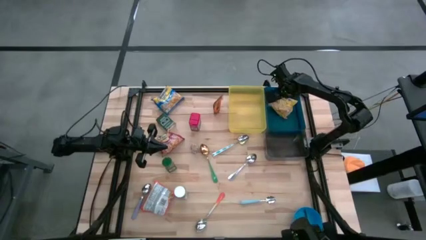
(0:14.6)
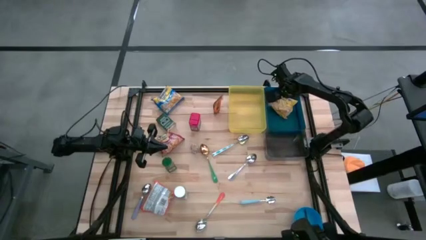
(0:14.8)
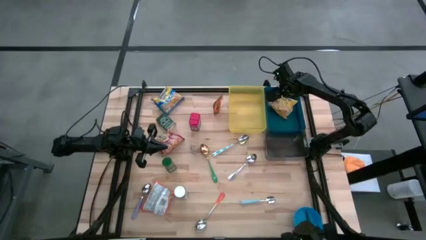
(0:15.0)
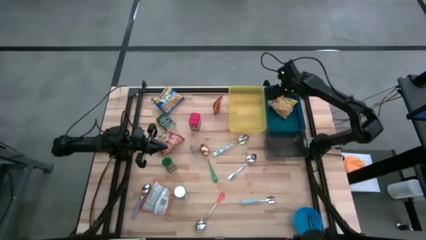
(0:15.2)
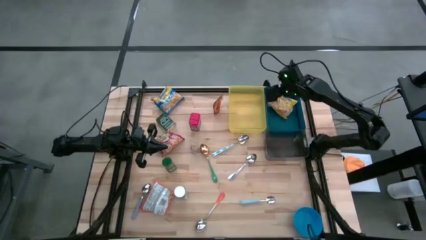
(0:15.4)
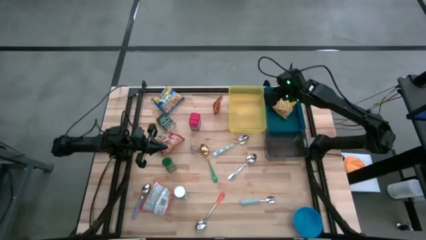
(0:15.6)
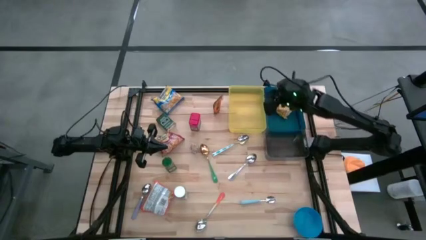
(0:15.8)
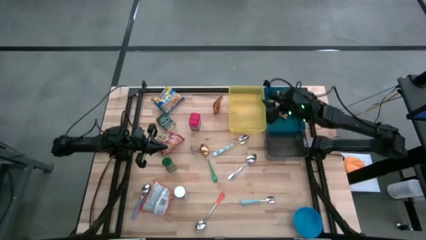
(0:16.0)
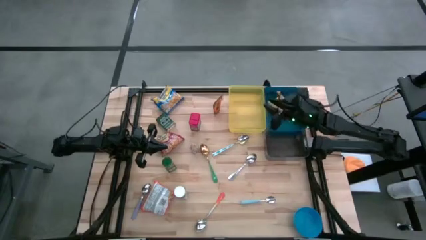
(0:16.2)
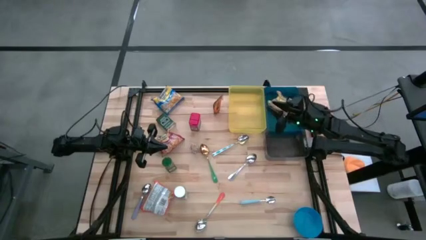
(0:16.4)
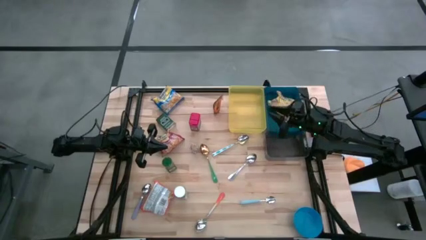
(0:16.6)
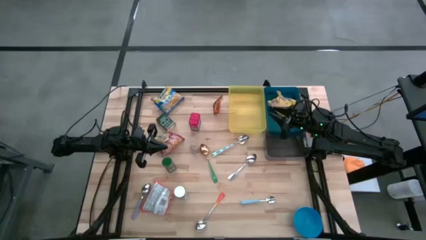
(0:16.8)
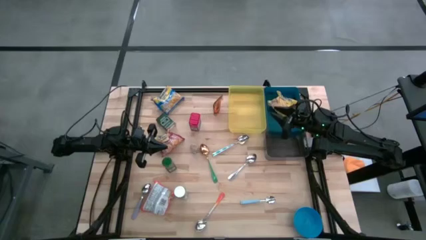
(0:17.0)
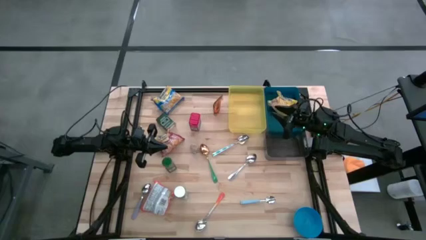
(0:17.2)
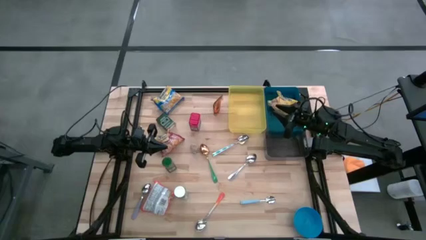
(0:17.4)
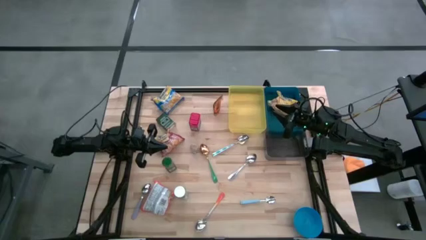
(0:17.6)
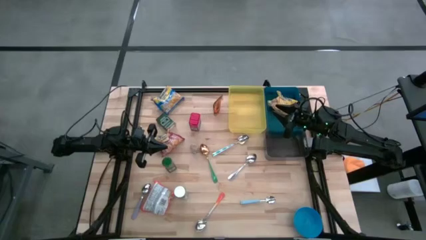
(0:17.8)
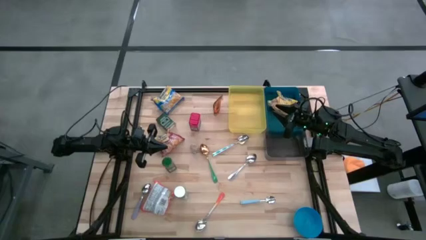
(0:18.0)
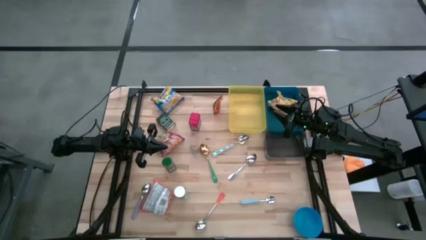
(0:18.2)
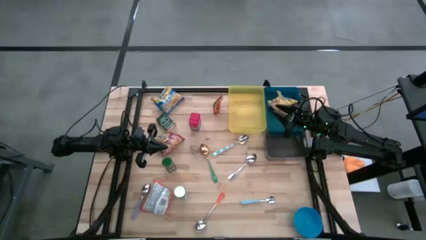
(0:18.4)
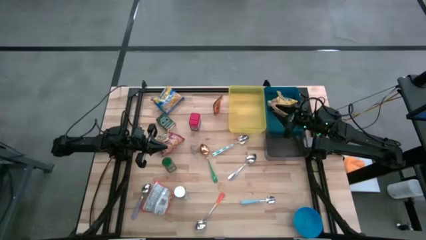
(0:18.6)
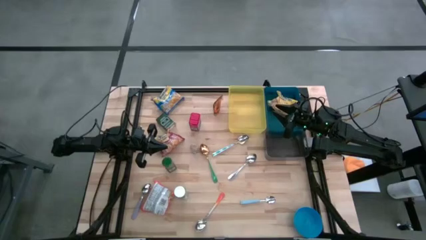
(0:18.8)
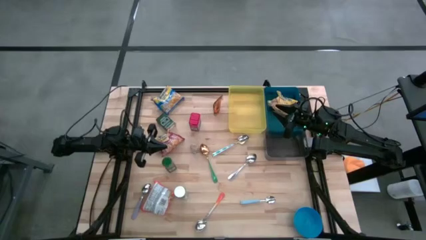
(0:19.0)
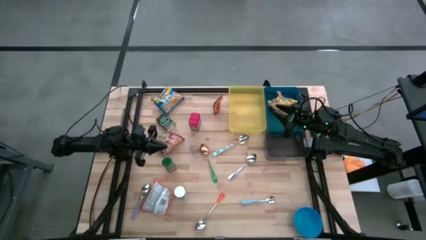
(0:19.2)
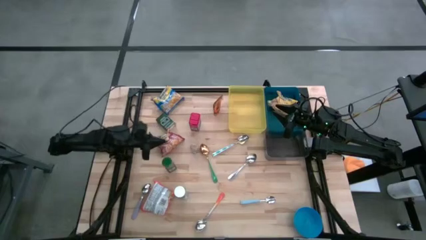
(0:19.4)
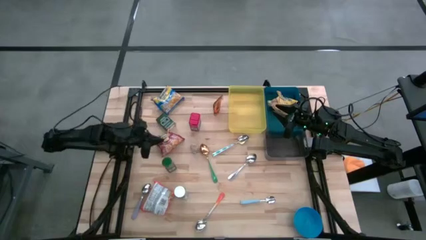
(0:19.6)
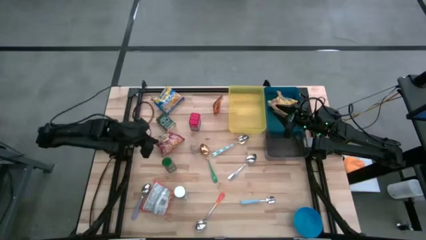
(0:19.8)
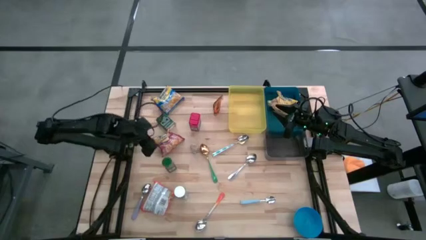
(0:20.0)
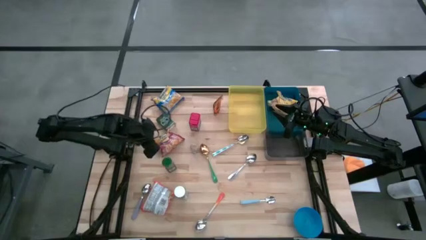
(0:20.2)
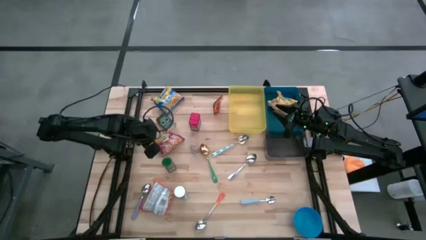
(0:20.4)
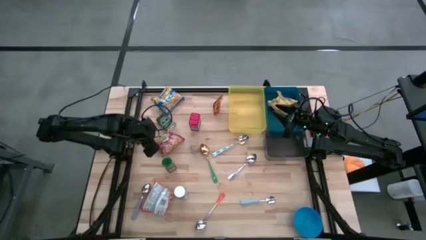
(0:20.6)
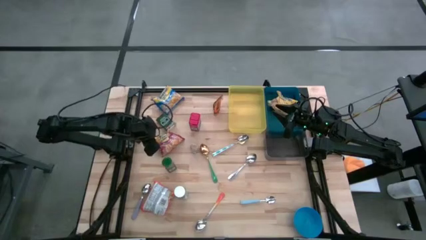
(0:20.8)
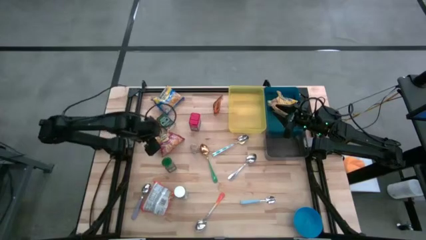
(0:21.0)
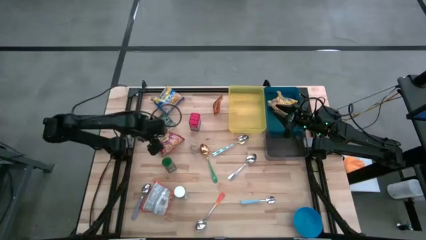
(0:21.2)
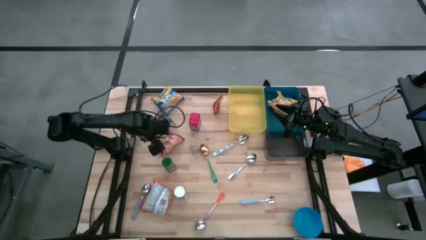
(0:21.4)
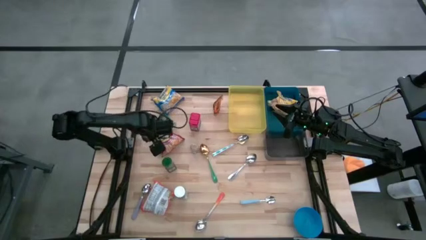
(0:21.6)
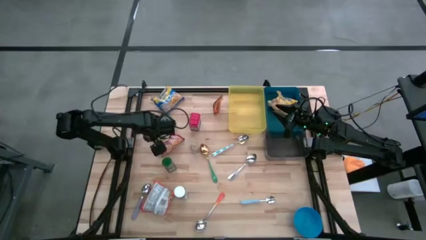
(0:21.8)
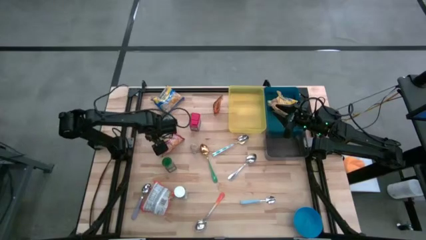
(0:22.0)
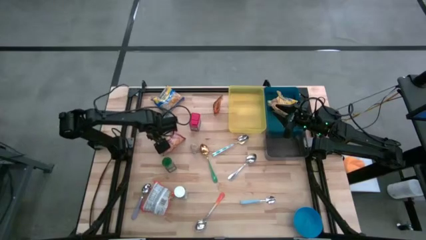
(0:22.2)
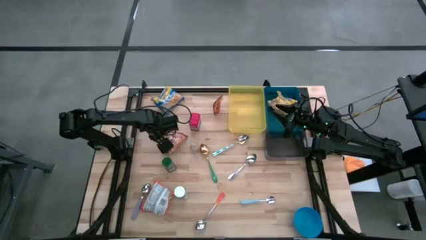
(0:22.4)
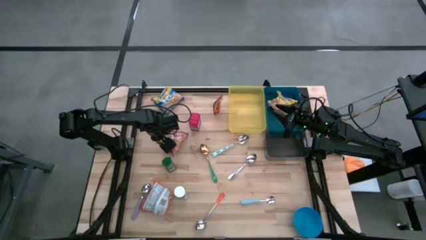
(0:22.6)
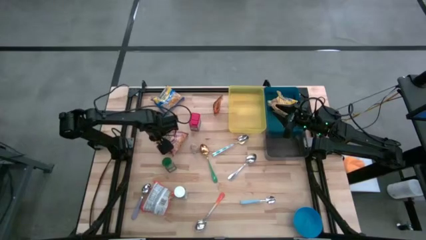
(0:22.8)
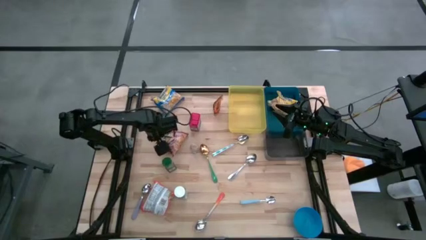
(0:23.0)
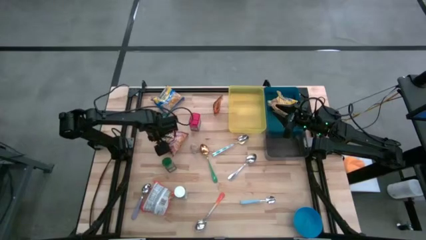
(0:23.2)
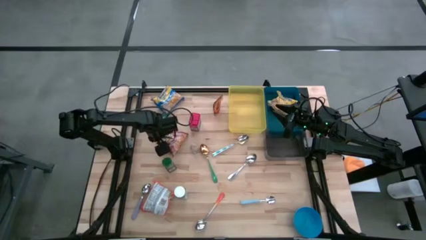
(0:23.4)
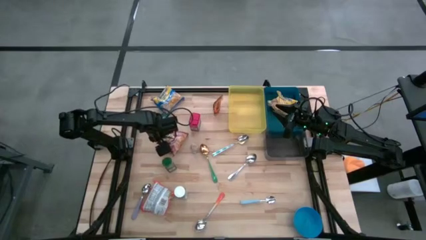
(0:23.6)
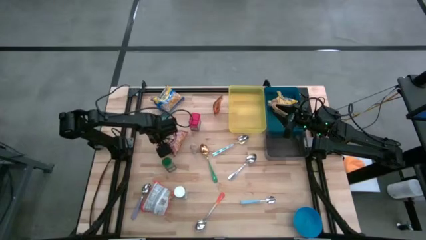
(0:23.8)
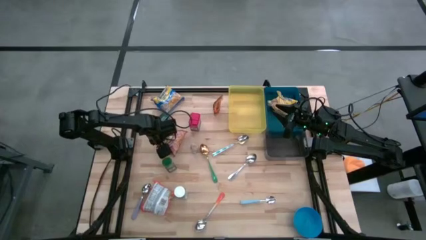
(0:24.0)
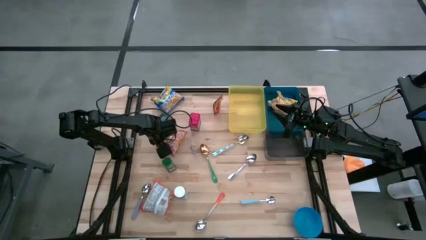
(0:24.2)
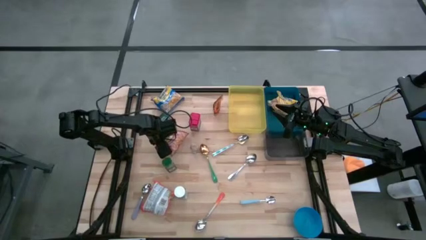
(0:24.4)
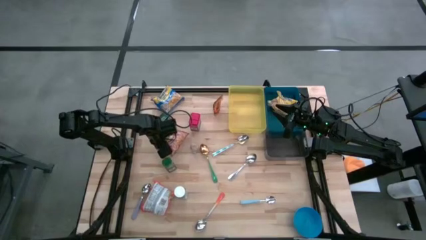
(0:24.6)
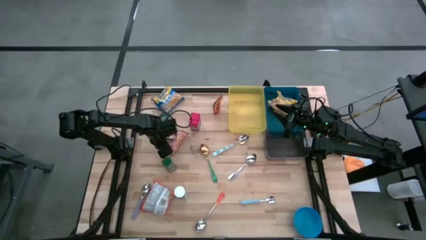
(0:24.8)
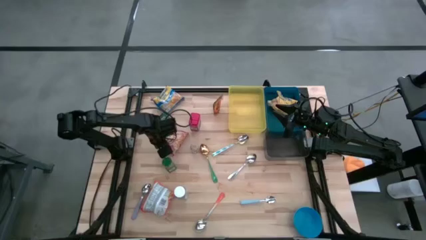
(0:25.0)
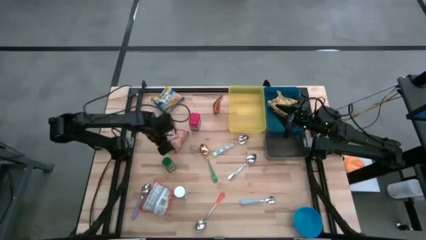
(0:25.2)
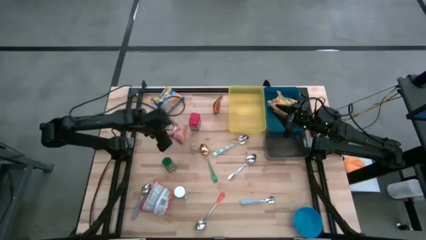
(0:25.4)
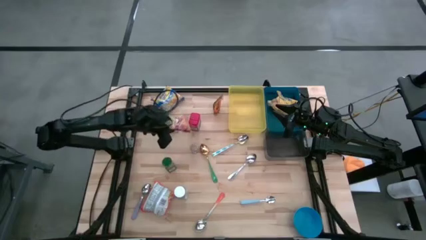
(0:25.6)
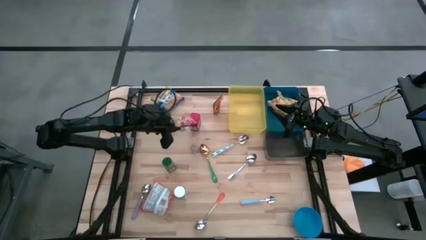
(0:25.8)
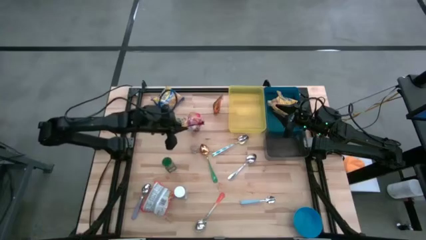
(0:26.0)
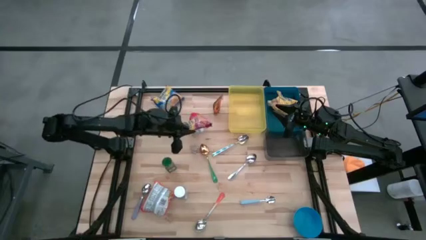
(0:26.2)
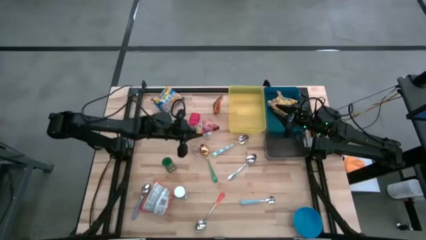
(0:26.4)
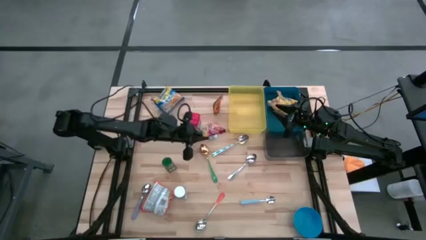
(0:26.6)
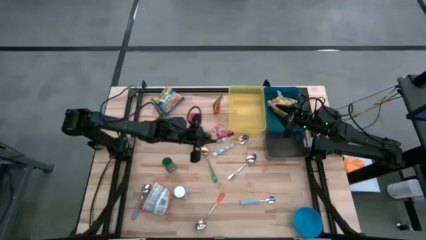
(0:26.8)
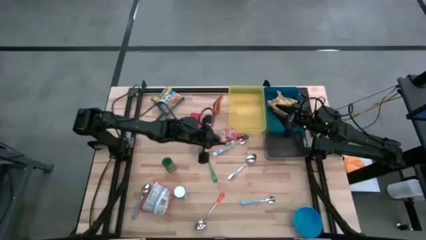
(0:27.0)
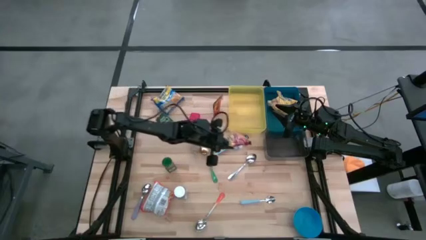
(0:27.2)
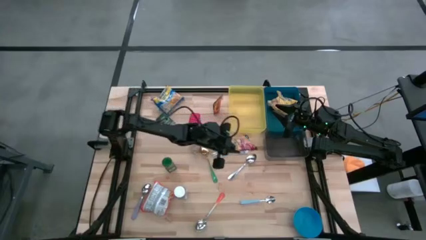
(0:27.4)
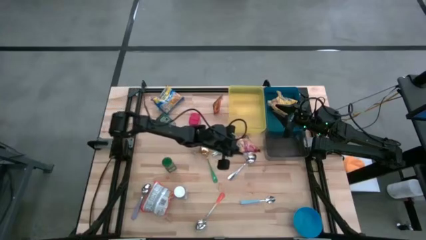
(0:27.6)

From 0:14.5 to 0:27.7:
Put the red noodle pack into the blue bin
